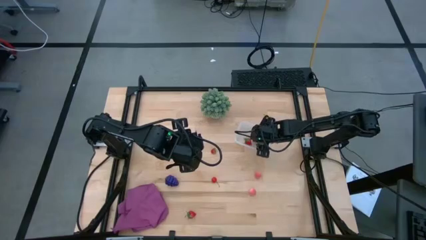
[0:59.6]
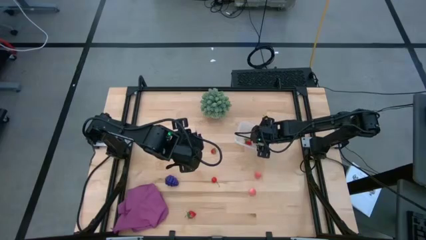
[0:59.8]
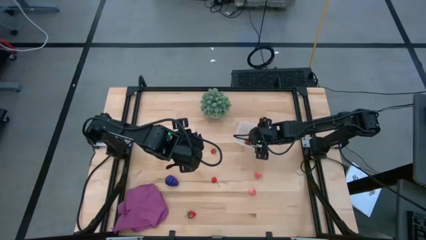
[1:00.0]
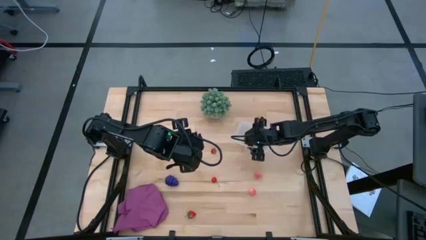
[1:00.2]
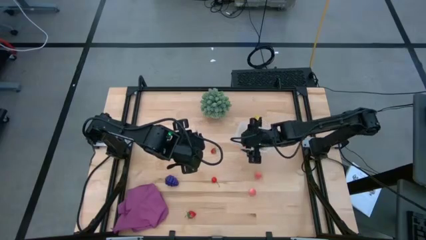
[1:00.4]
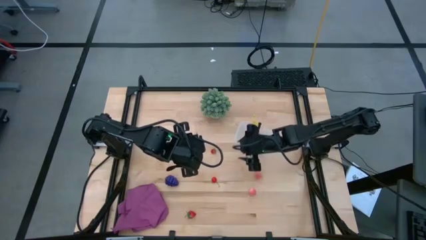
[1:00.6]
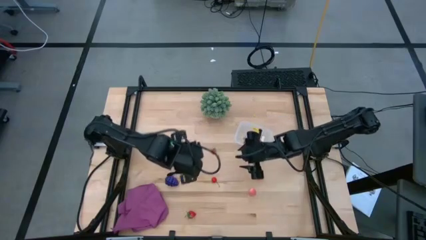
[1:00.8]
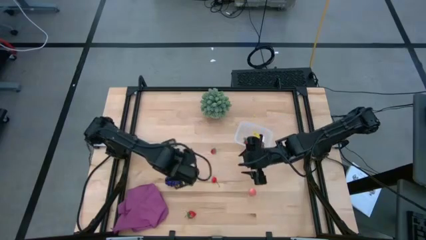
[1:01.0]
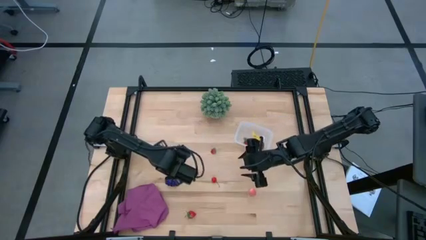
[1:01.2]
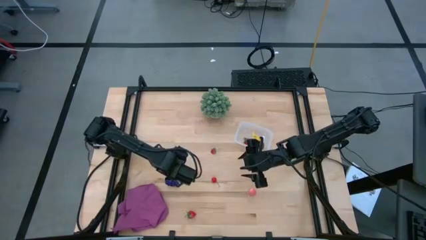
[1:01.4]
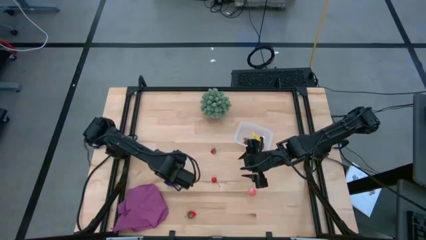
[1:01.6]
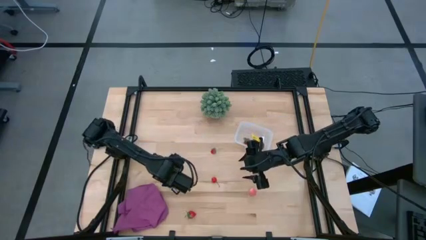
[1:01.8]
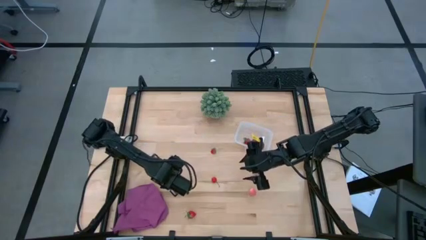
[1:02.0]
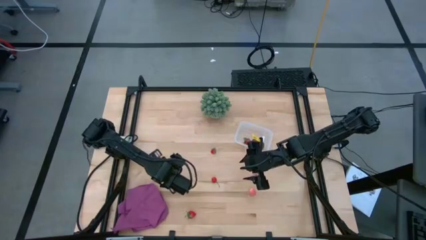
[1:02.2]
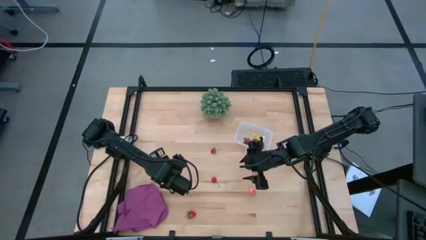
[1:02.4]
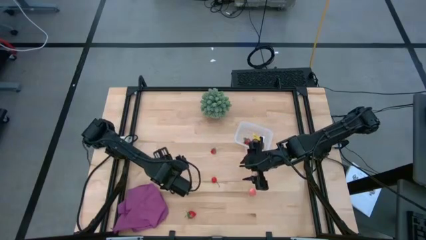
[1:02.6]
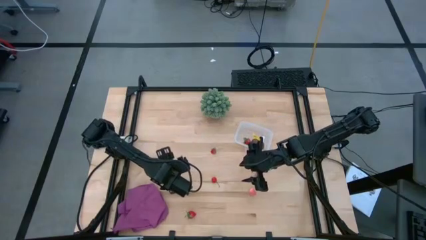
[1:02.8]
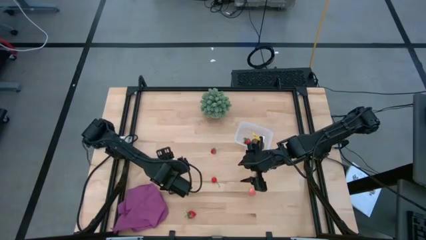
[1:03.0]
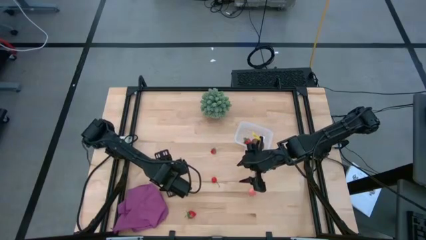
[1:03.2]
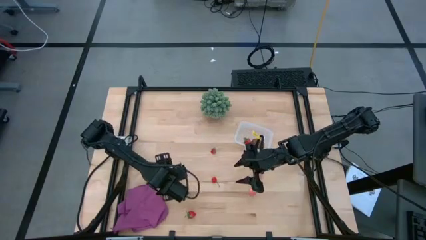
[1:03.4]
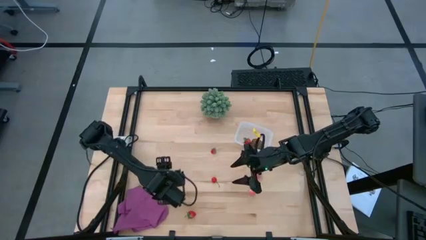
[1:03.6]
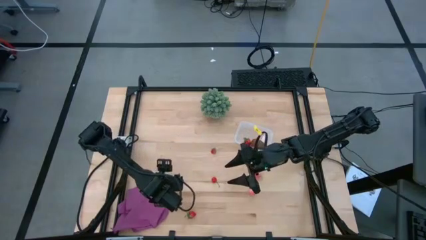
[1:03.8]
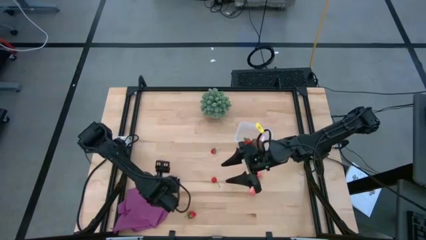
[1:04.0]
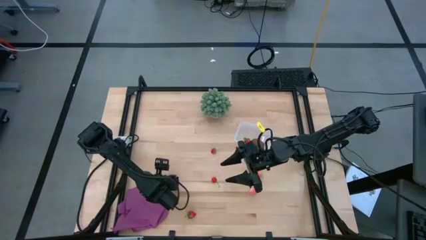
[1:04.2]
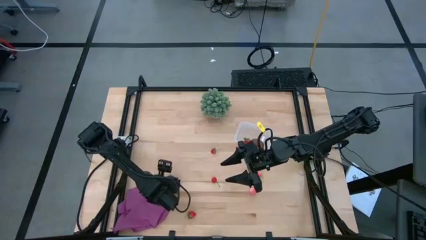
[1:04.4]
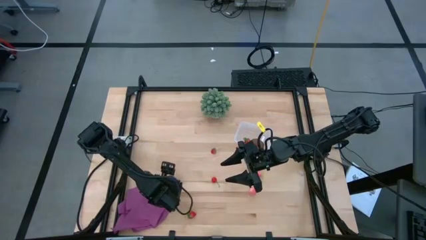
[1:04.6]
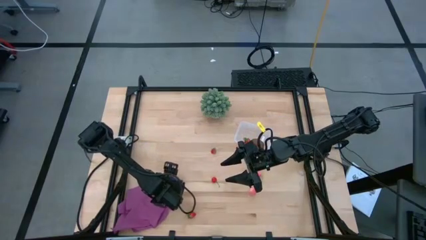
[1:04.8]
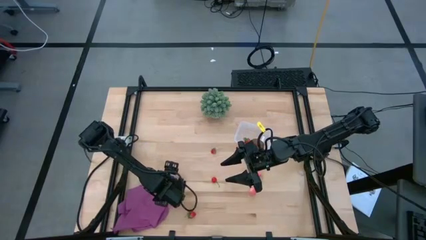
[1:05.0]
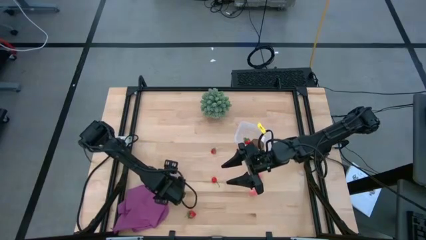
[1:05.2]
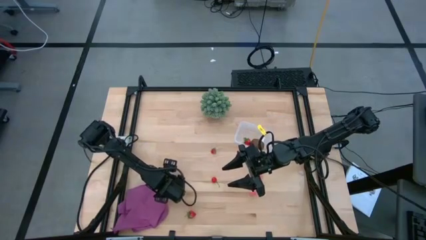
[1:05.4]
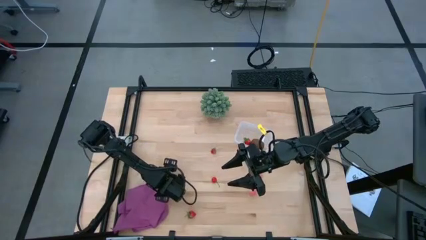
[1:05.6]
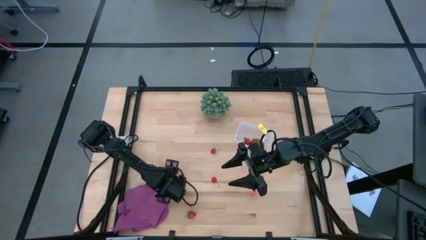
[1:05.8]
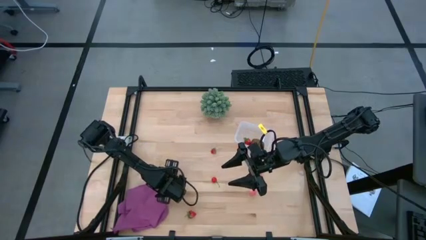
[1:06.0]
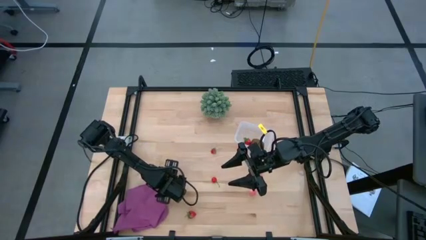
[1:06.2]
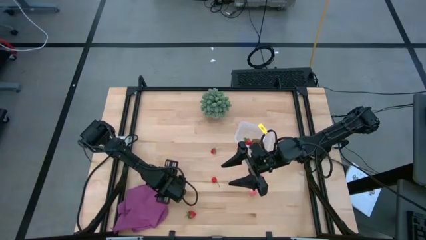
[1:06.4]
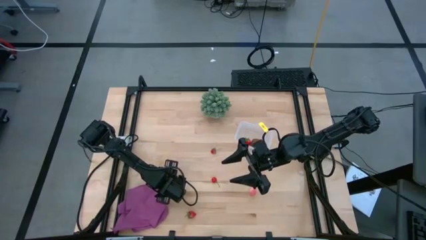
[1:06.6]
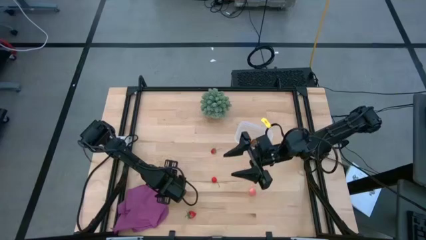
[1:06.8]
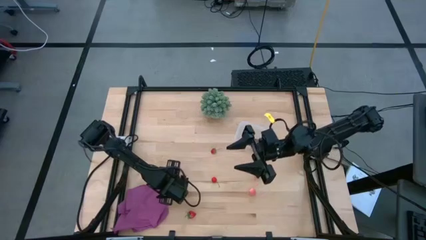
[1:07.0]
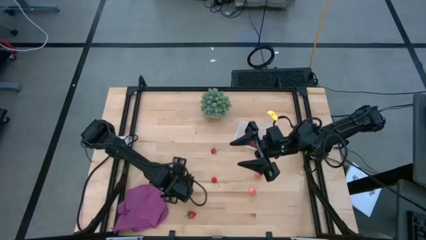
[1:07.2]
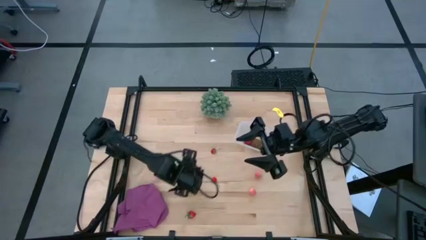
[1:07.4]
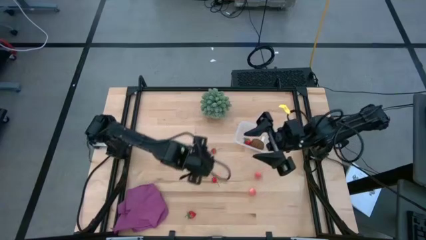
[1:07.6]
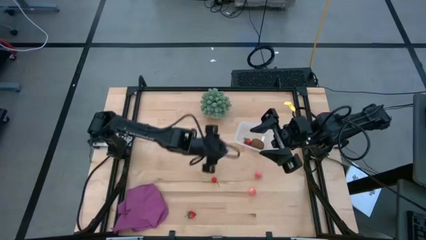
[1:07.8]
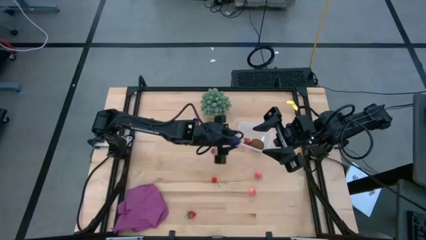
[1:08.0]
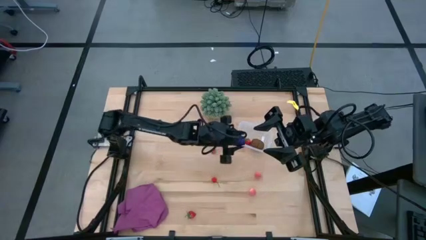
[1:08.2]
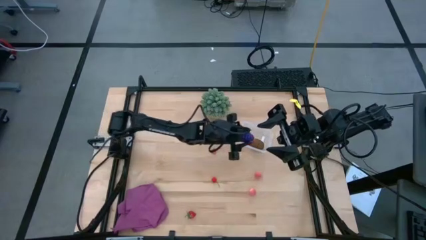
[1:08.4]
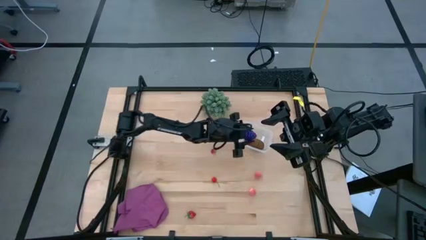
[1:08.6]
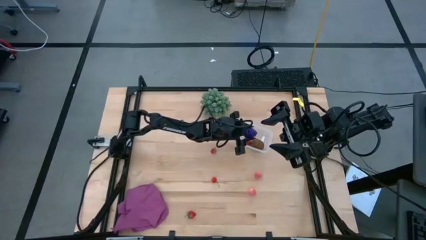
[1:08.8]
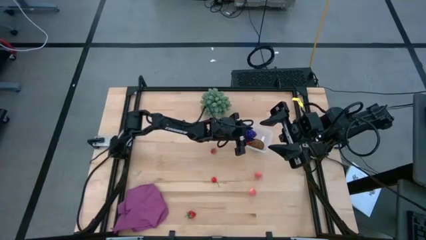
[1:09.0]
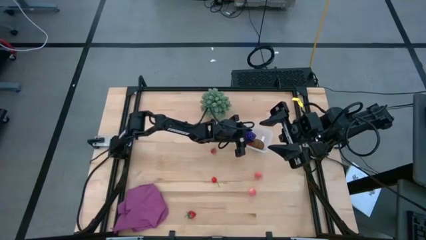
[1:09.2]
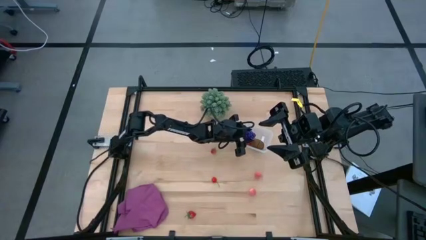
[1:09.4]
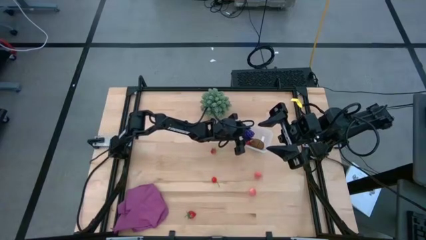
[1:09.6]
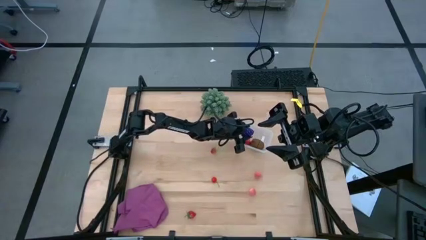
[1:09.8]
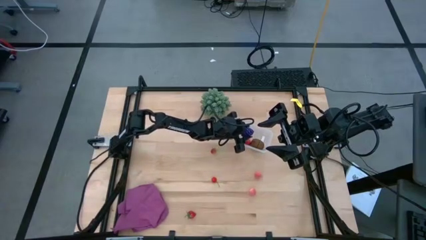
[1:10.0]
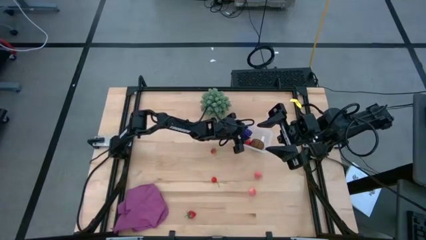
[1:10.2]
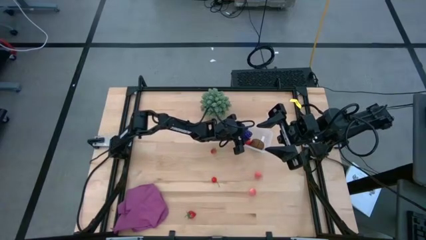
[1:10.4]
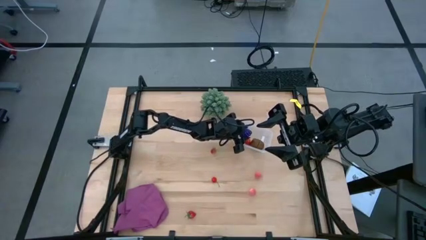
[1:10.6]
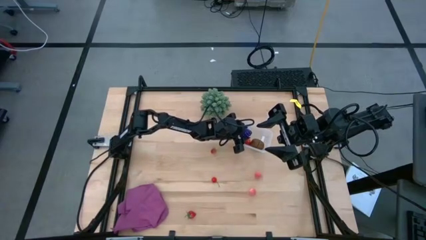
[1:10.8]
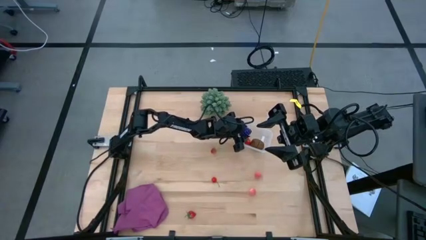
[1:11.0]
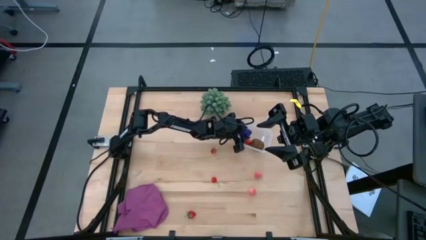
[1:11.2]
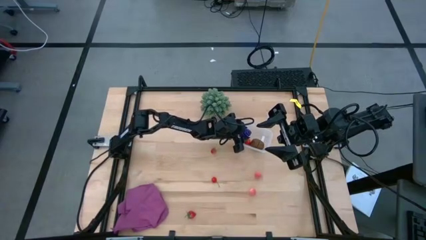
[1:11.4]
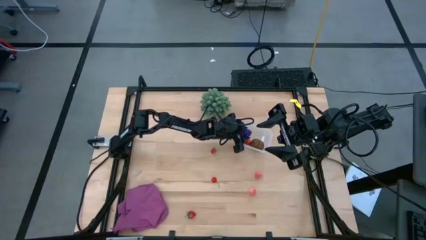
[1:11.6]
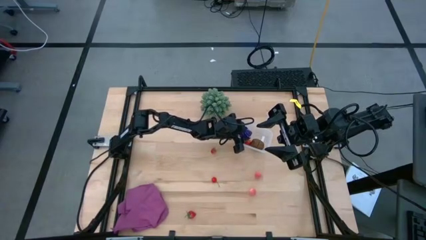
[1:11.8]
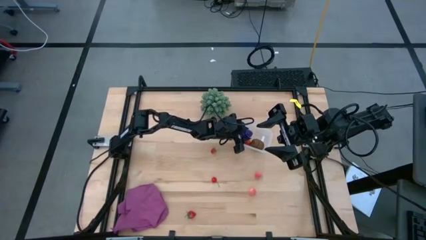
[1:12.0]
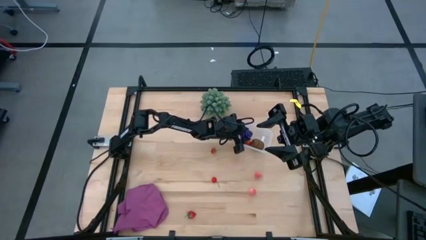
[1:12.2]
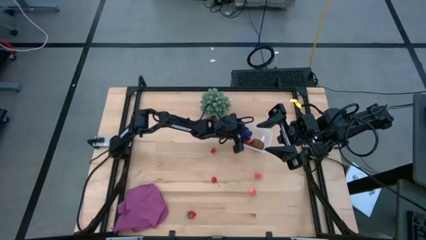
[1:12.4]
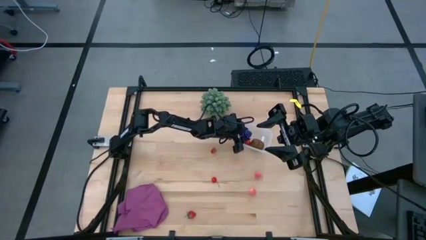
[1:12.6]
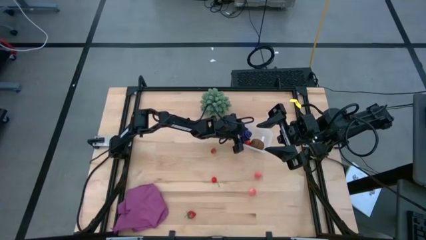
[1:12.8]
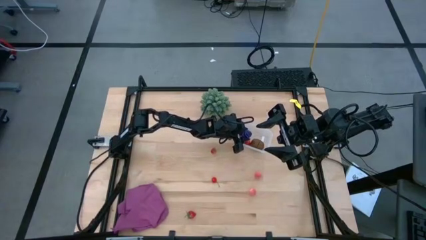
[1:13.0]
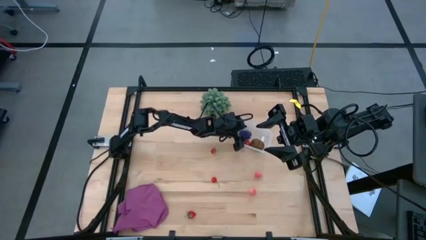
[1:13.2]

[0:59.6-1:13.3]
Task: Pick and placing Produce into tupperware
Put the grapes into the transparent bin

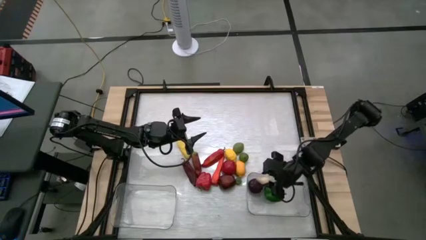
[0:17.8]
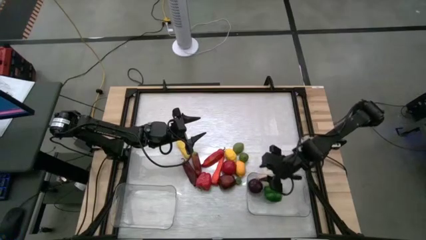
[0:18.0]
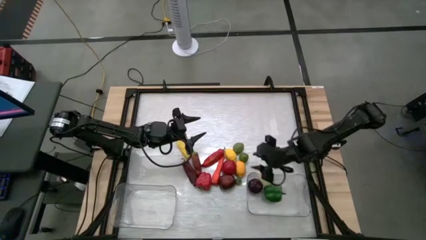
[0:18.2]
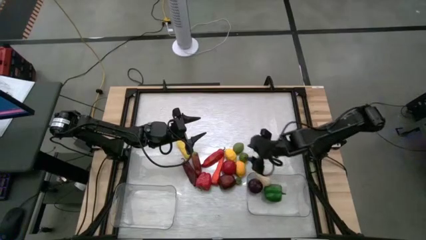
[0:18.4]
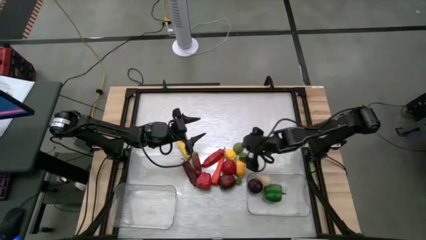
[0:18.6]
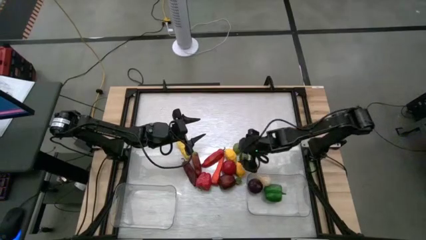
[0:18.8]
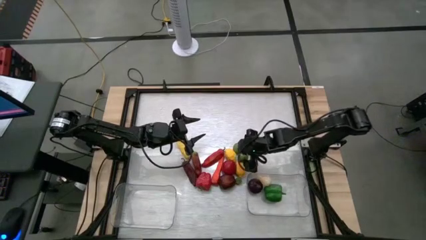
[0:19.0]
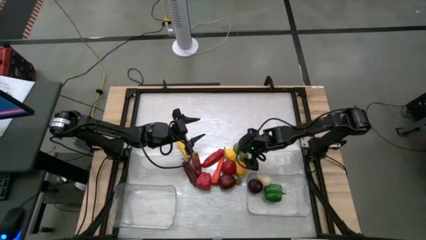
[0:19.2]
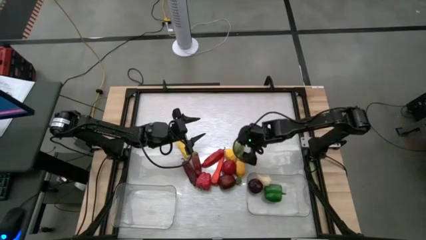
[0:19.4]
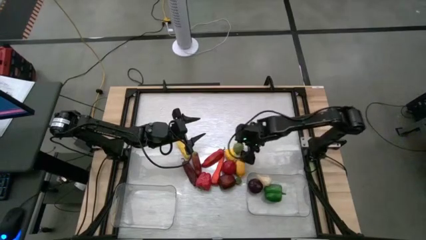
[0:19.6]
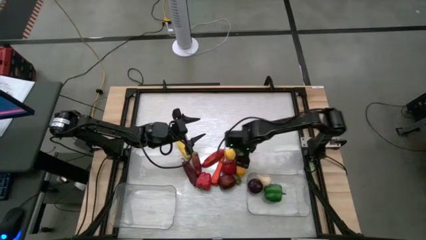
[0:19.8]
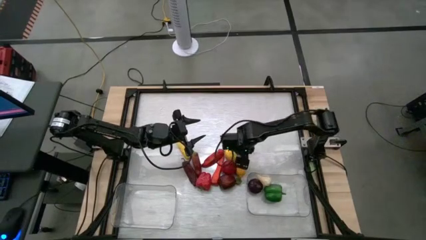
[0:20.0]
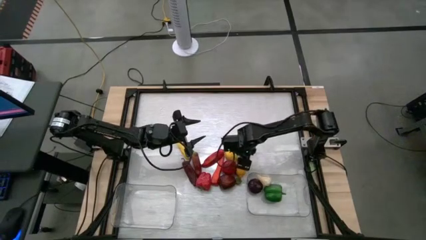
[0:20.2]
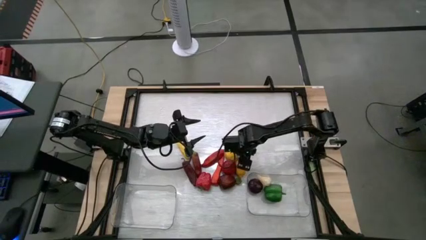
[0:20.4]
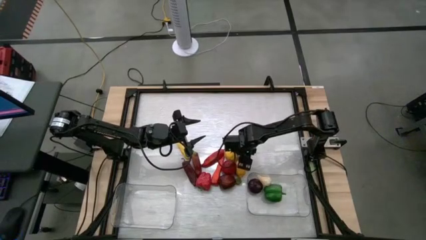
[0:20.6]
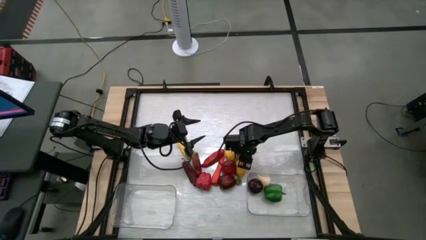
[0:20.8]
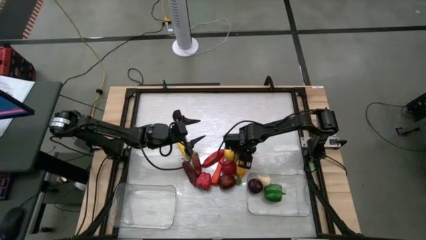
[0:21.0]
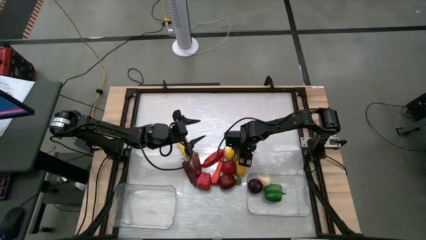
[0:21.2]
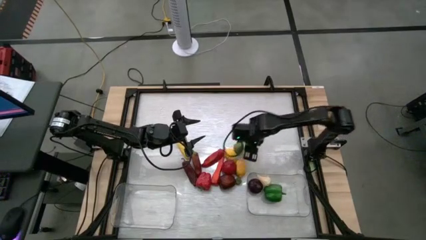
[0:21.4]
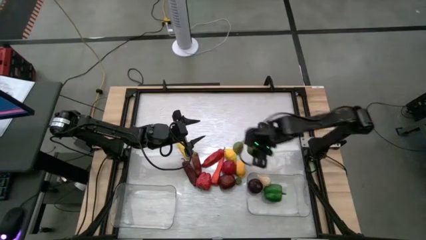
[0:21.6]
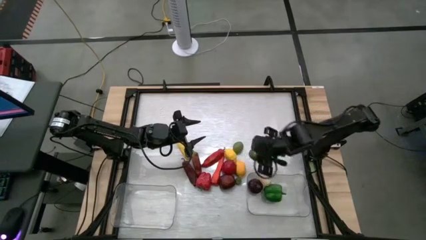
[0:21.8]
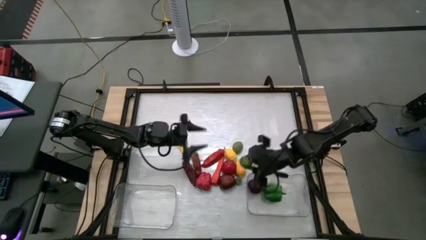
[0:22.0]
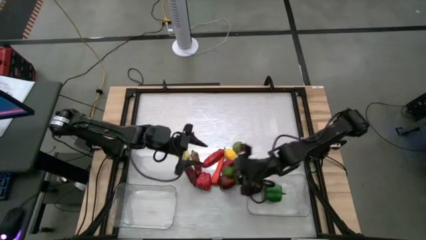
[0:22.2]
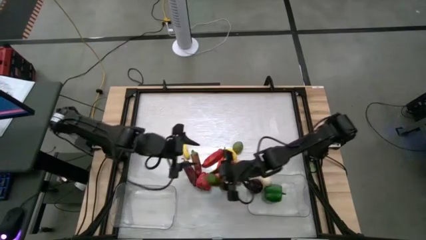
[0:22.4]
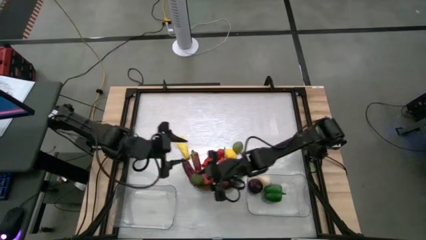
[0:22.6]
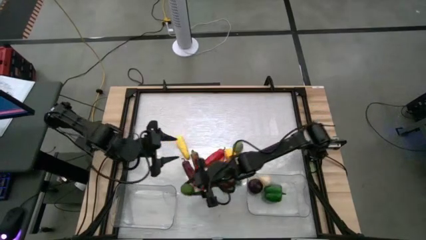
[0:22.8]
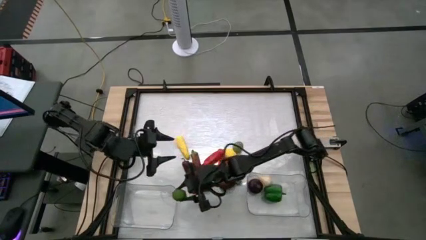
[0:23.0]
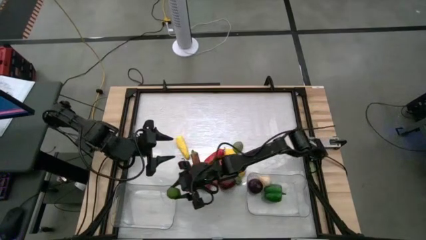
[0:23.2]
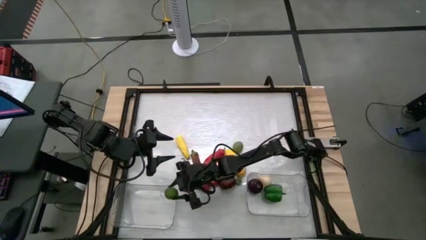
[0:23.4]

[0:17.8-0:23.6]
Task: Sort produce into baskets
Put the lime into the left transparent bin
